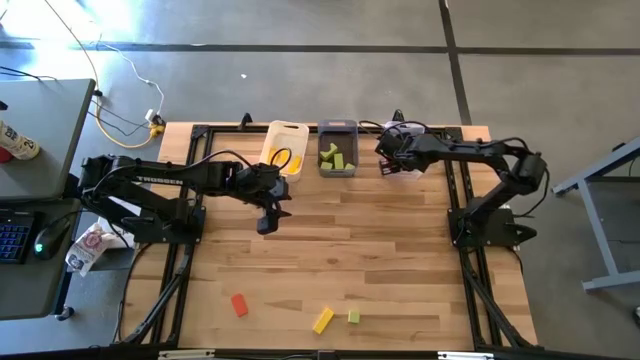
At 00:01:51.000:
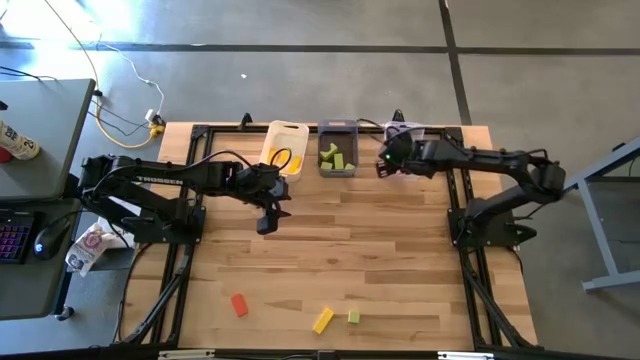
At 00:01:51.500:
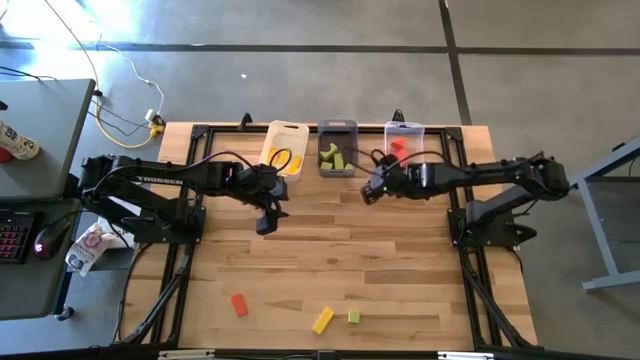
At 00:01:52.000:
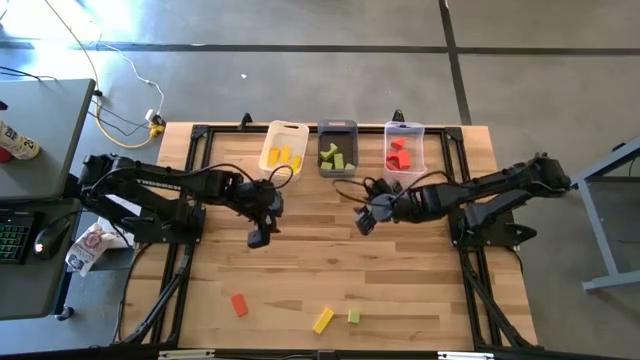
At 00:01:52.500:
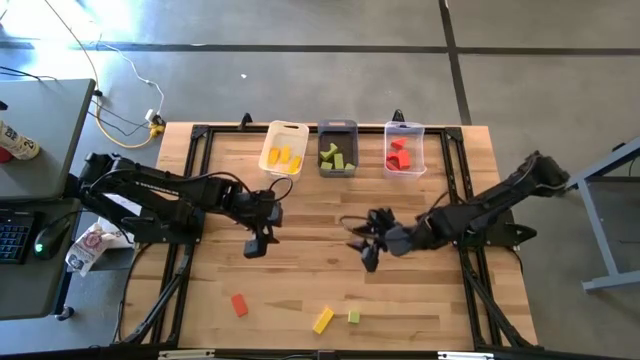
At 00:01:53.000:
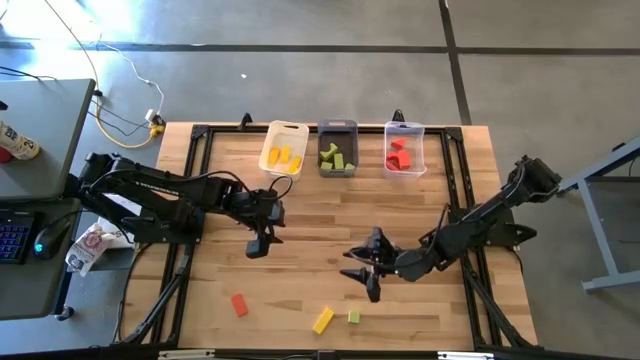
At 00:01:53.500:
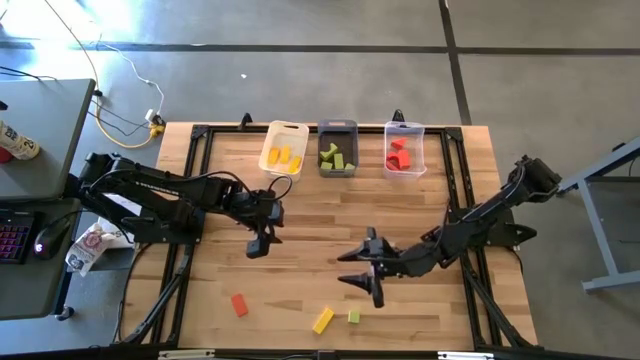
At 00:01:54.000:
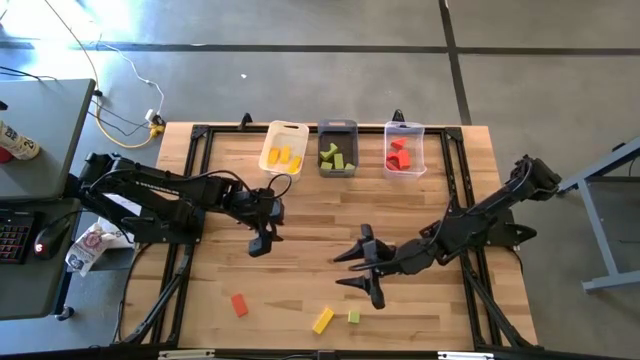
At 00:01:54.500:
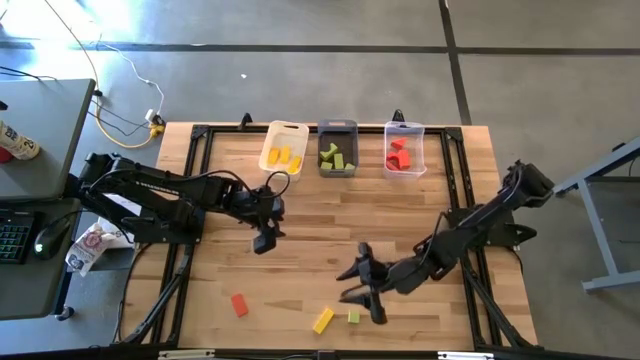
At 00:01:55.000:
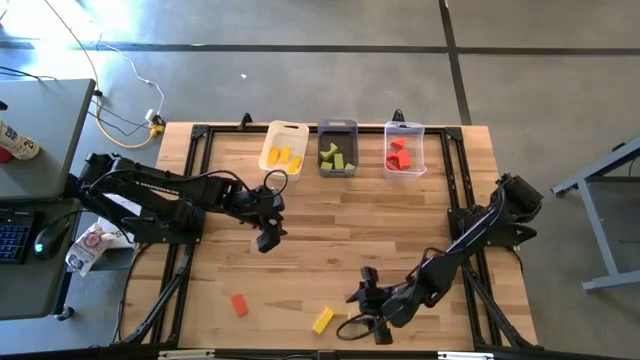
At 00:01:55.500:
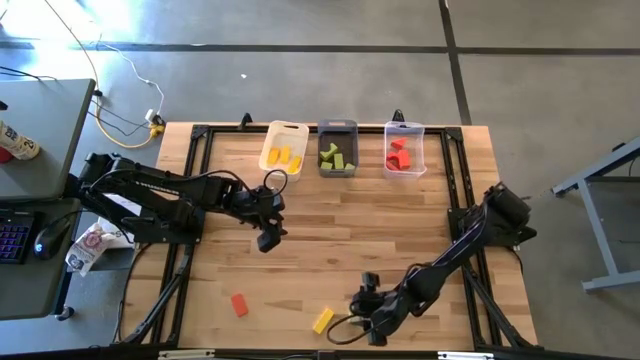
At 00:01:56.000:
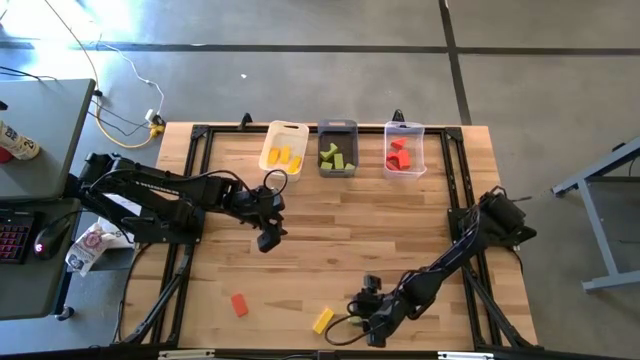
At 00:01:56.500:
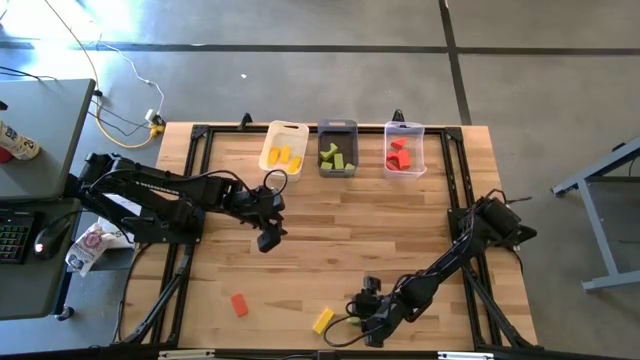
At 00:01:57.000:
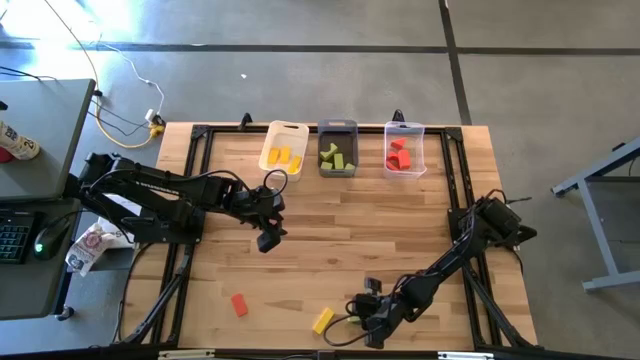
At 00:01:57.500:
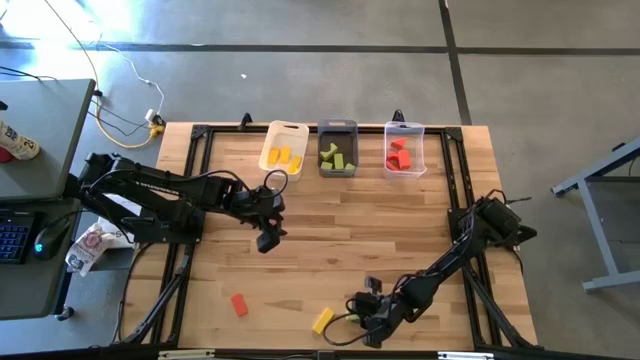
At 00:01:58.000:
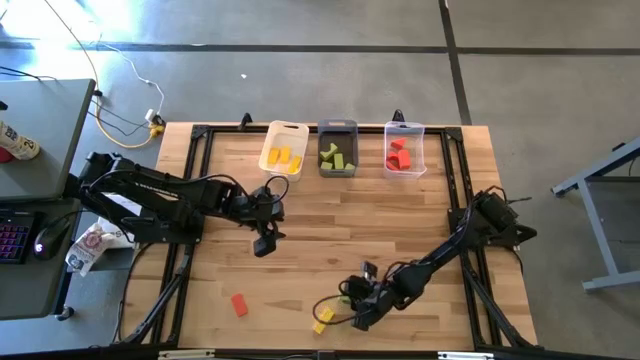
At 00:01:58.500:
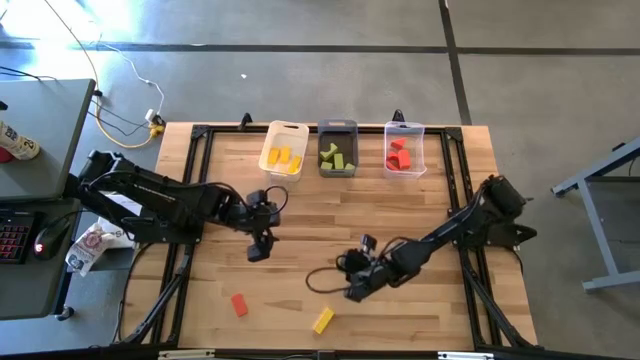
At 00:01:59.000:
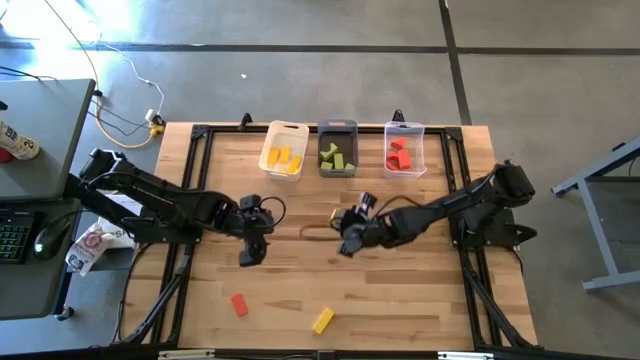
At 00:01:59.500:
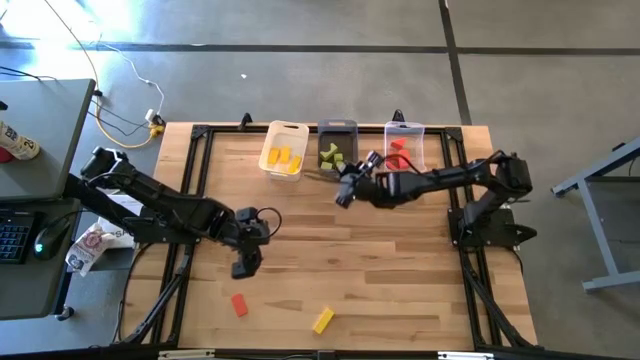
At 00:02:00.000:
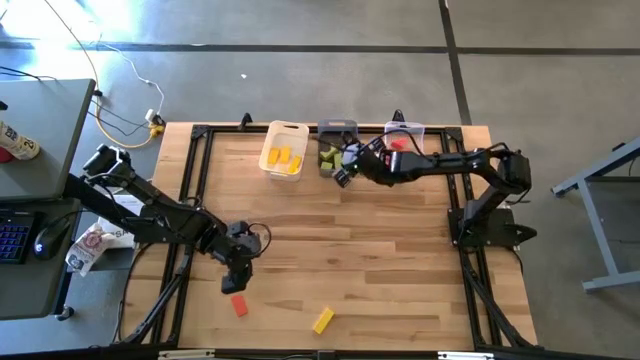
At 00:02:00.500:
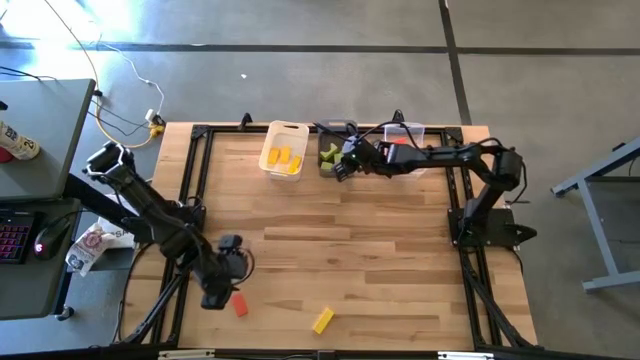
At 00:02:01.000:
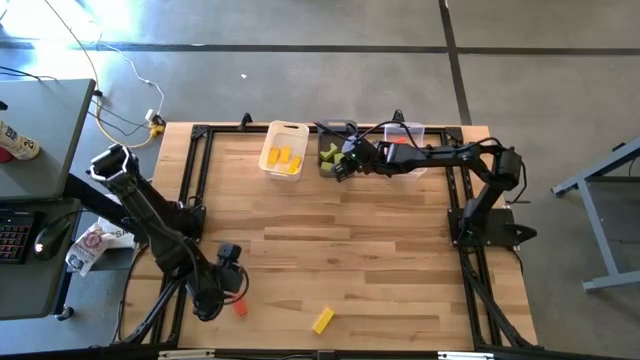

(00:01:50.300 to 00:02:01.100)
Task: Sort & place blocks by color
Put the green block into the black bin

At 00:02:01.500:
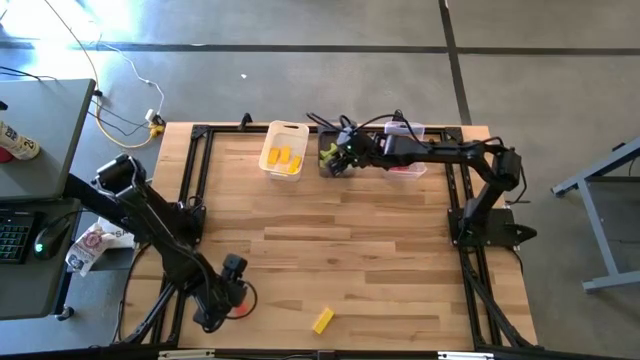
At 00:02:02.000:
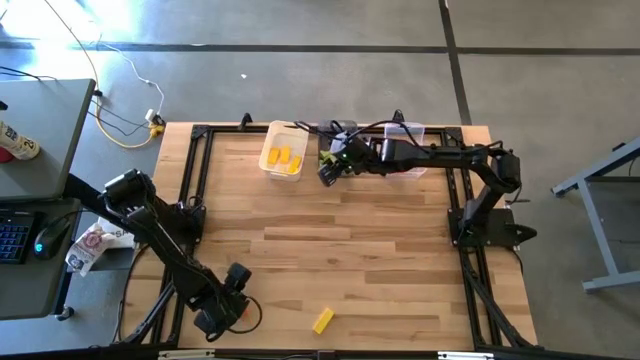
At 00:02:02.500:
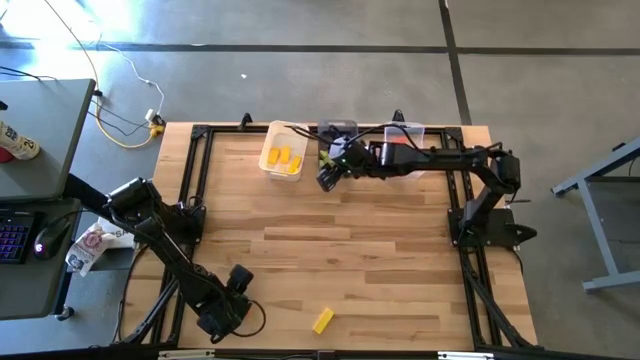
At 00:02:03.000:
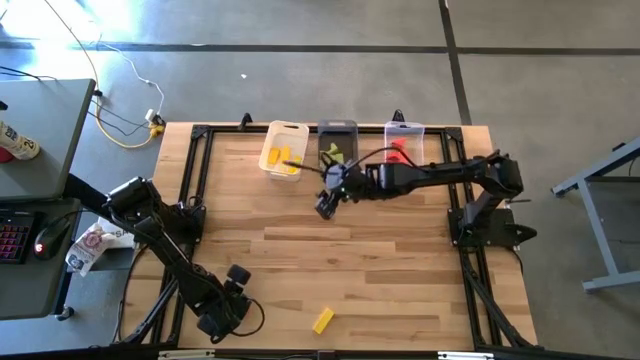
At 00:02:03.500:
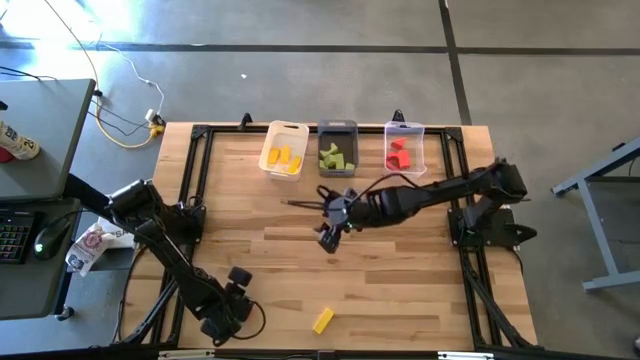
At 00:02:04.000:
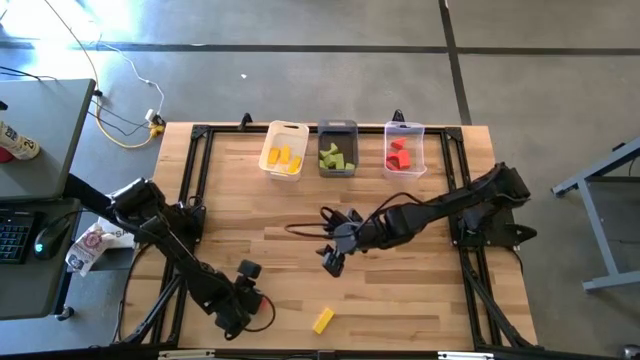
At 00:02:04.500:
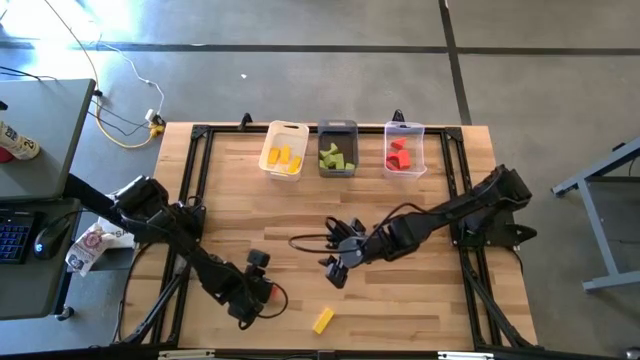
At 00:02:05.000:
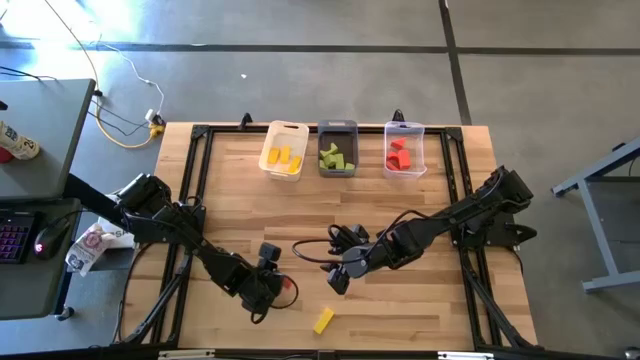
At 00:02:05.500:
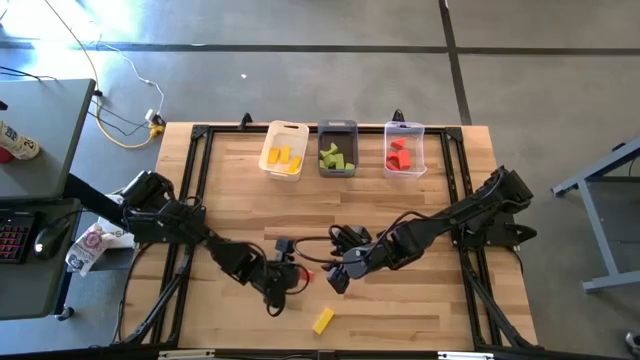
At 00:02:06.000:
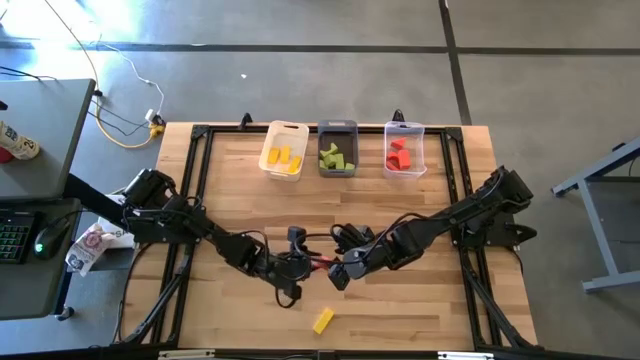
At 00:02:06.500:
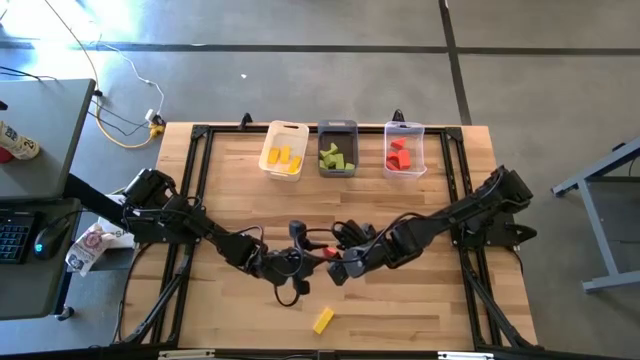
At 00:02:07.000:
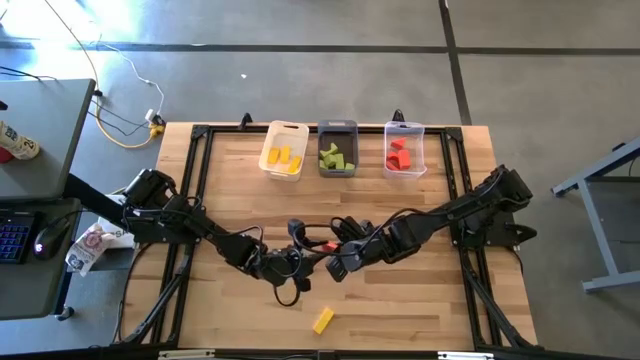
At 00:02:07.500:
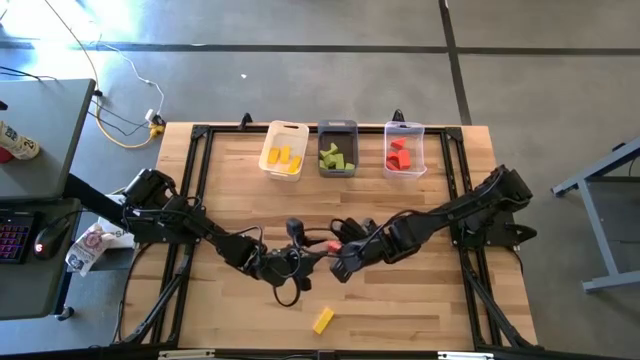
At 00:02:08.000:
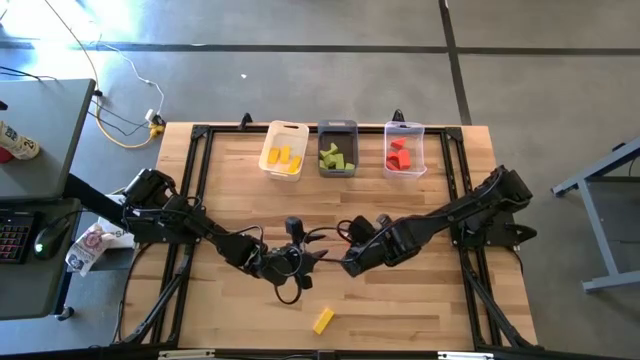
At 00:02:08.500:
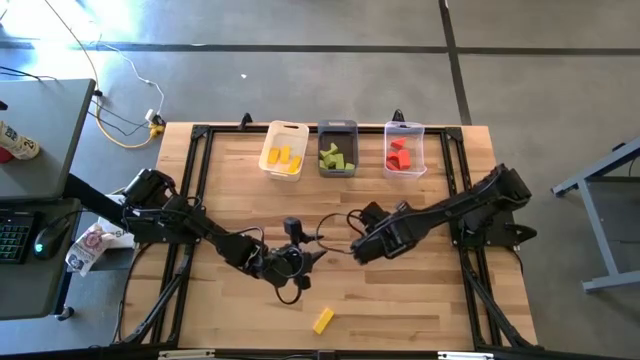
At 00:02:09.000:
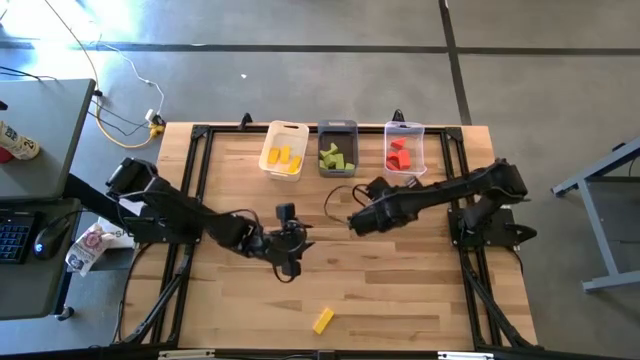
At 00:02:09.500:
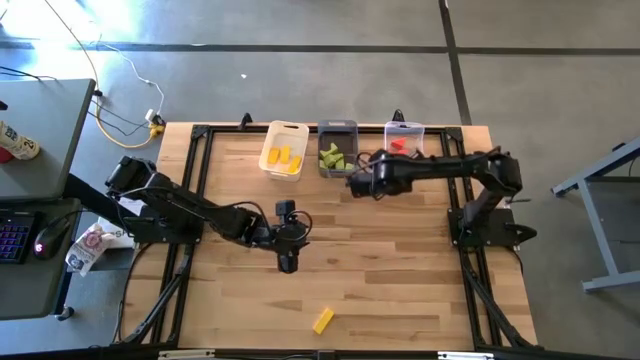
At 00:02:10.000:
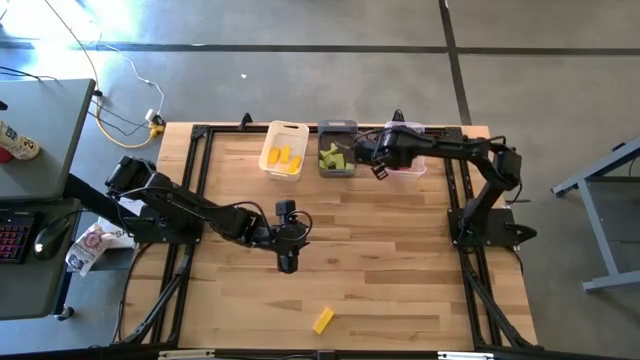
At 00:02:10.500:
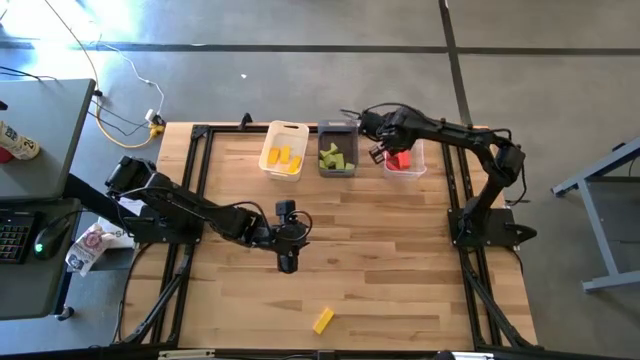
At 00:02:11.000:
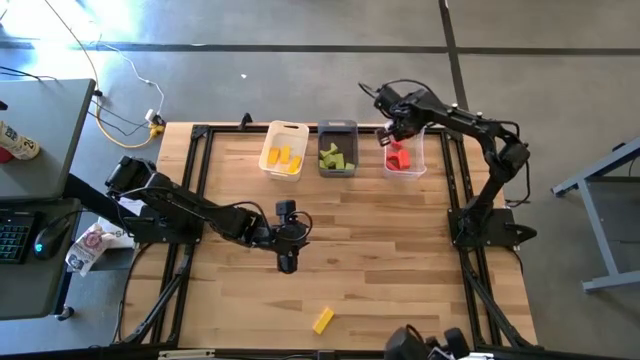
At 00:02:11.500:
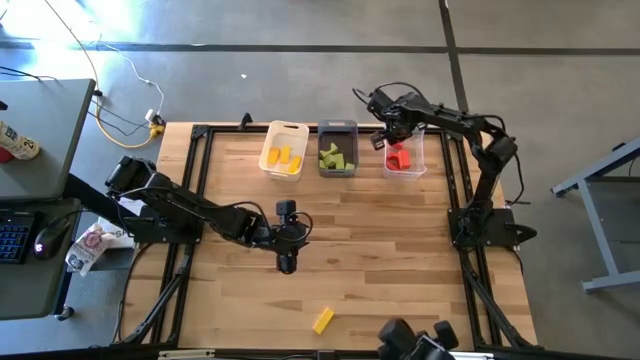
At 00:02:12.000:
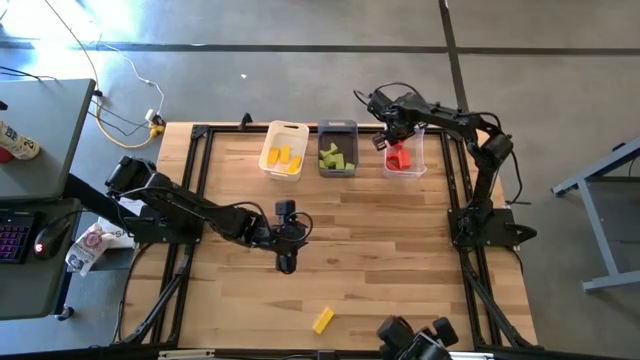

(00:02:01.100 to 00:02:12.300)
Put the orange block into the transparent bin
